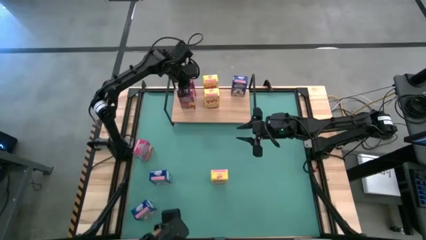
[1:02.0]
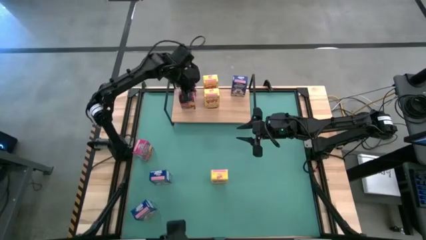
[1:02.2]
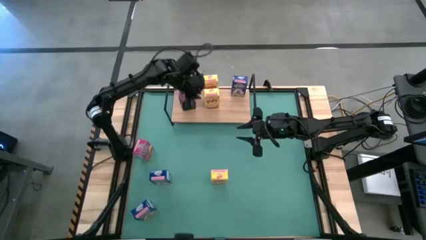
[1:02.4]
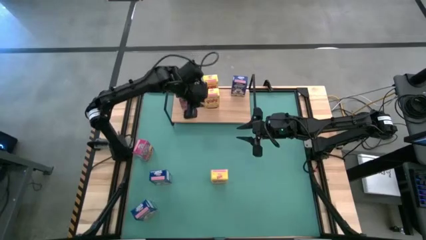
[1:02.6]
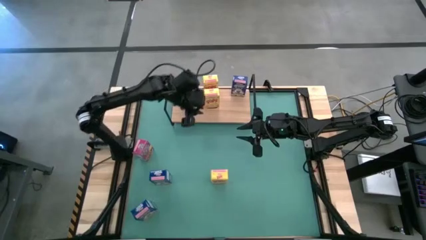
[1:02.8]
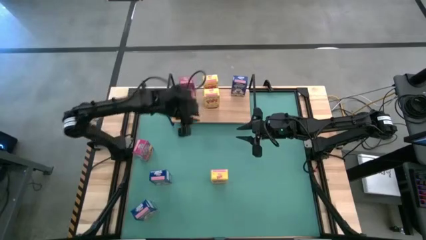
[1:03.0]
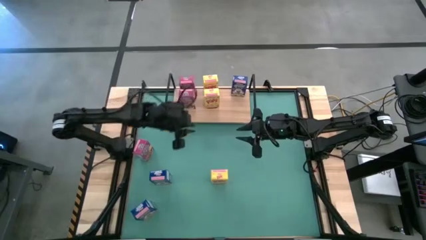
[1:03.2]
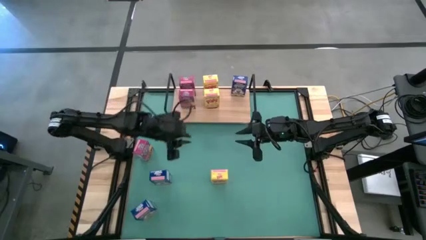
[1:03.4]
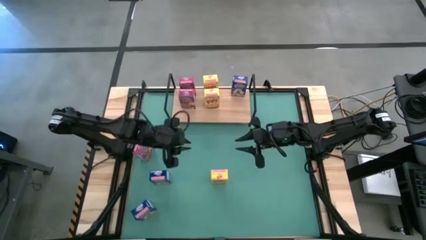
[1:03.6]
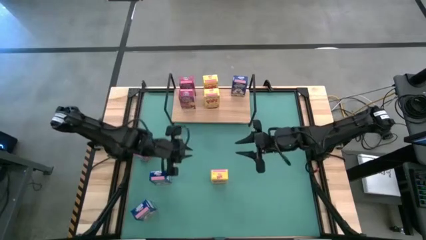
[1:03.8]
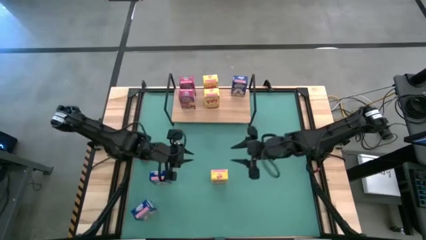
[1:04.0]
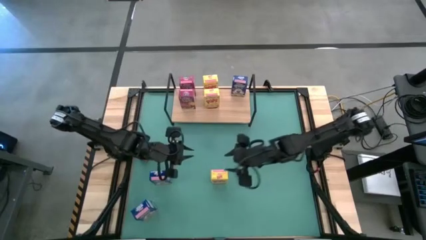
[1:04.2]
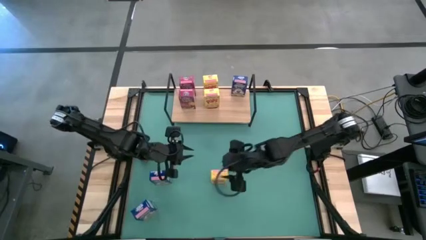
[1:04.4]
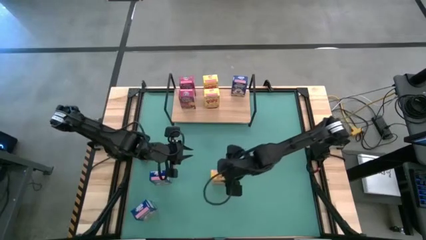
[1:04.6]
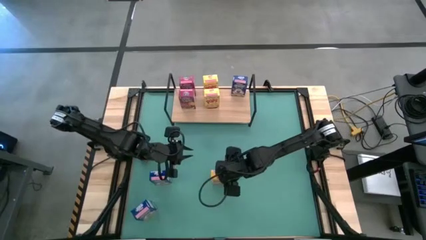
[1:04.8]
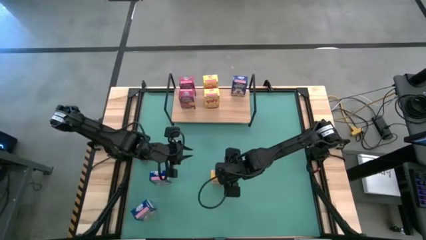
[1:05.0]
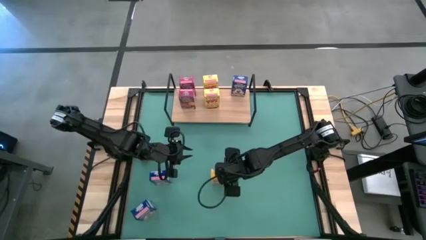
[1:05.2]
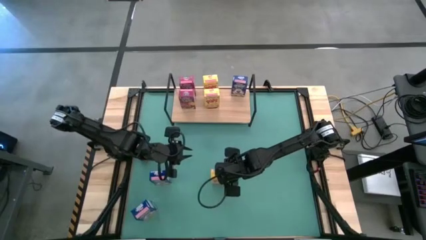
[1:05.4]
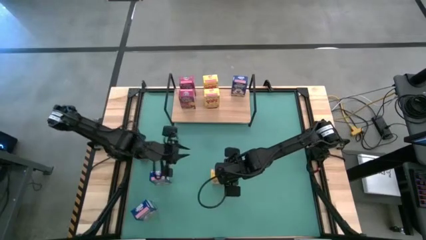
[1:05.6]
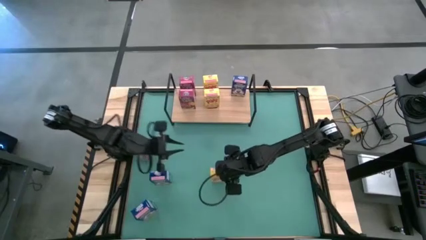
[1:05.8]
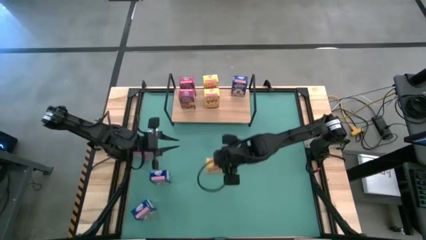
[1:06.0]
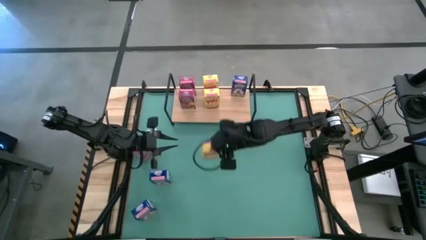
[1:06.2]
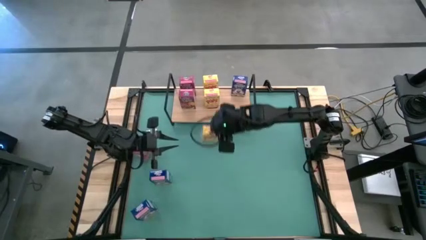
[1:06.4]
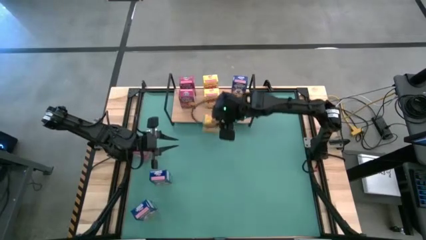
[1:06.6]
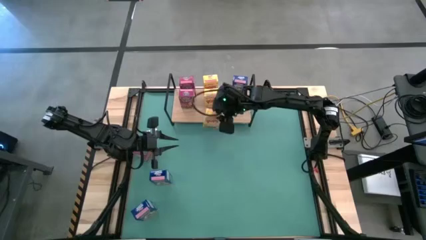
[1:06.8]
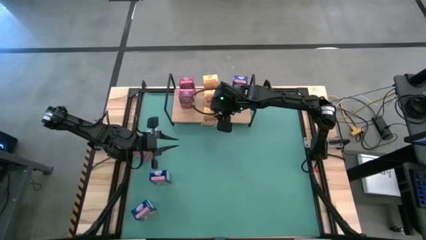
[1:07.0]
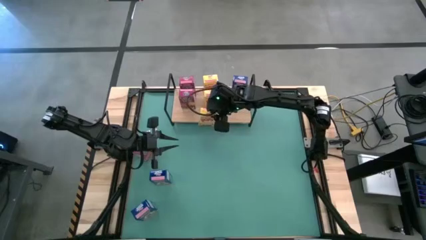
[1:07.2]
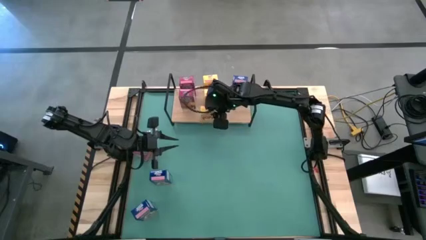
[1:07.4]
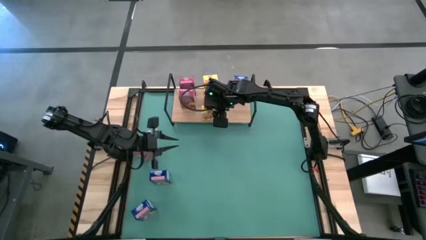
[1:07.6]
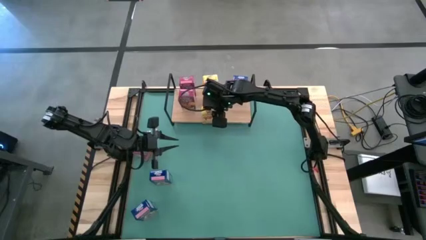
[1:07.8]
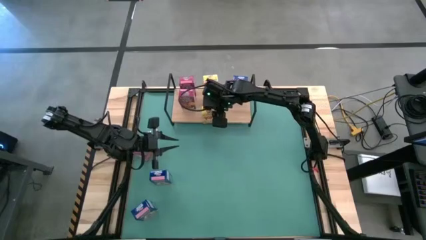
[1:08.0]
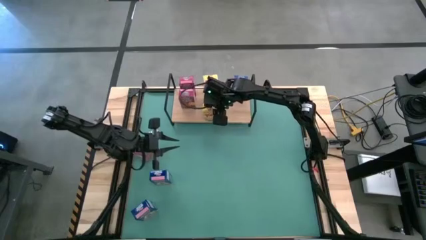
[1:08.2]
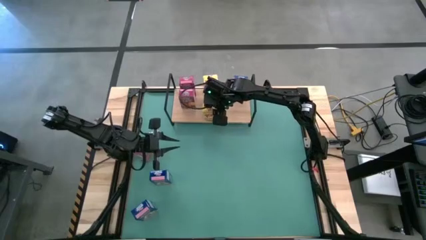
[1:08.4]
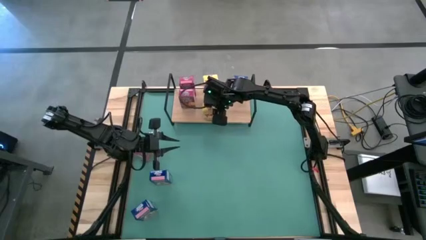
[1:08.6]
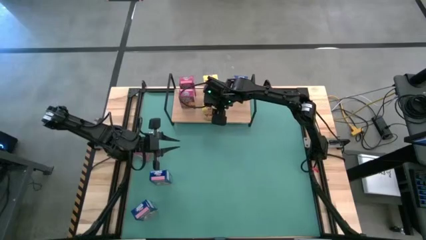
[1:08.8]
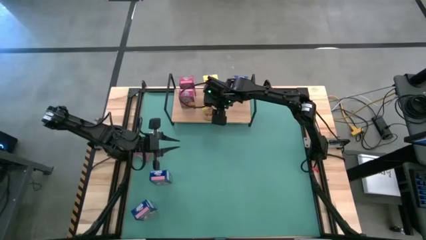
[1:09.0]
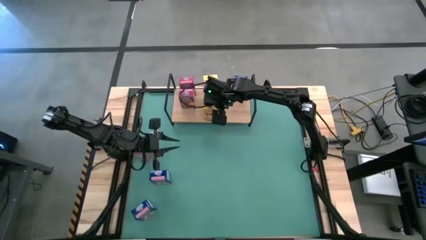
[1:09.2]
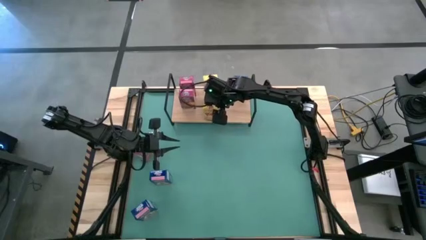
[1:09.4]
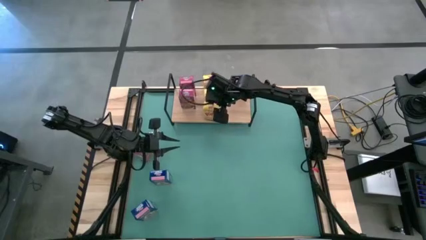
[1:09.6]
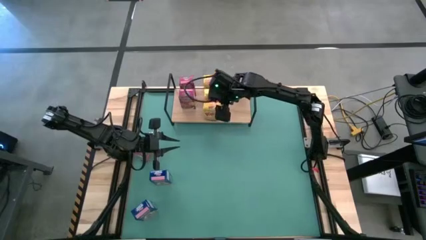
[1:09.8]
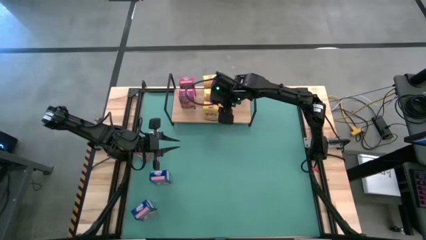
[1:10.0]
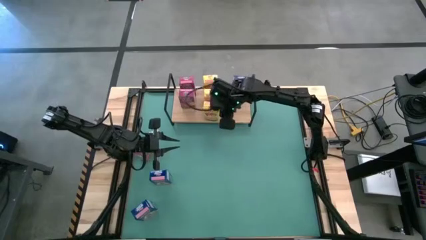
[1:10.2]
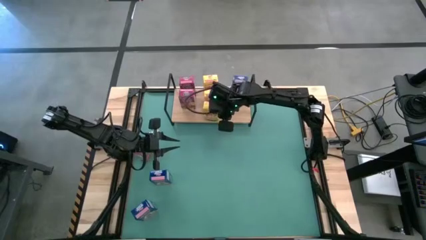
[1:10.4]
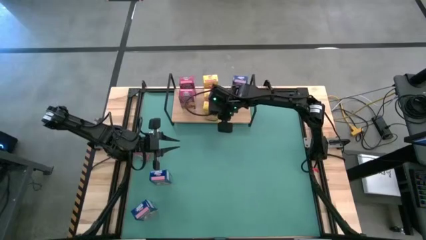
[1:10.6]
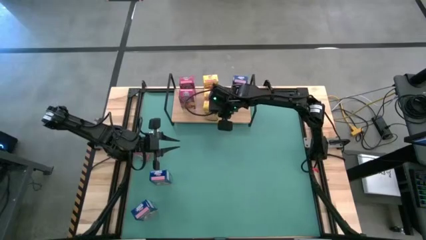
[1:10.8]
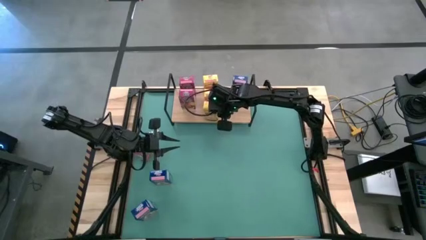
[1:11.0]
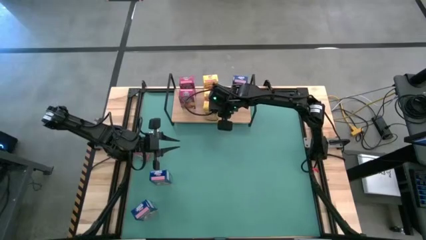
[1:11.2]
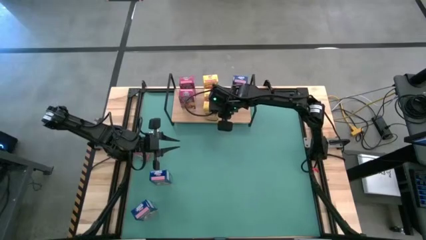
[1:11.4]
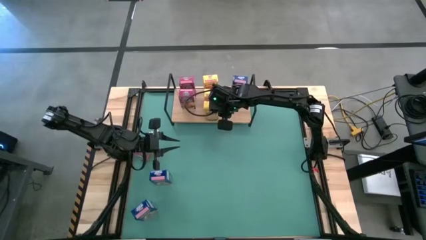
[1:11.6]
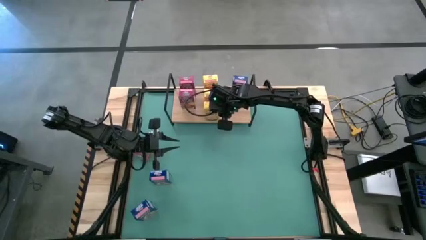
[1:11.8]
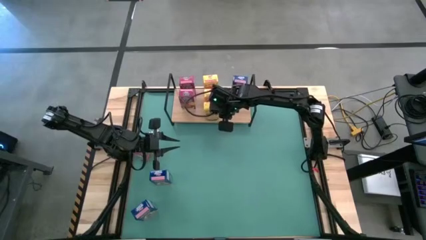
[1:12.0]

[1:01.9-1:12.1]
Task: Stack cereal on shelf
Put the yellow cereal box on the shelf aligned with the other yellow cereal boxes
